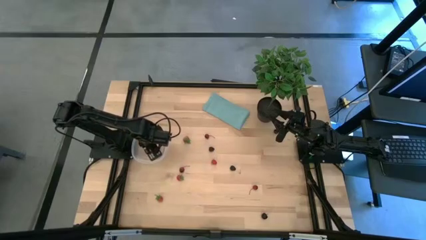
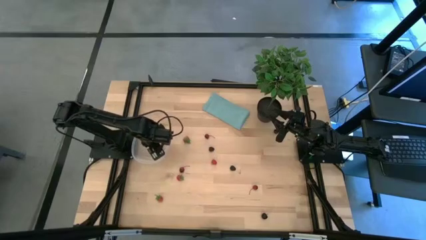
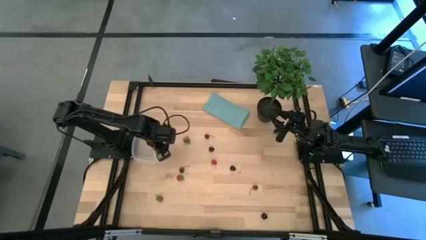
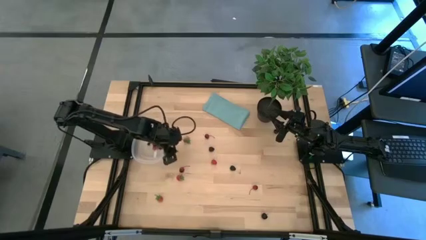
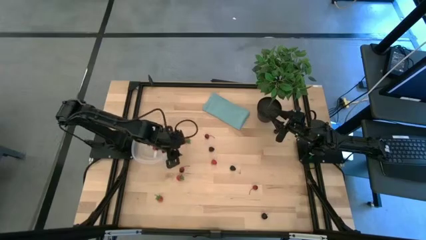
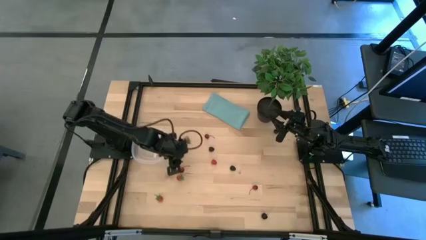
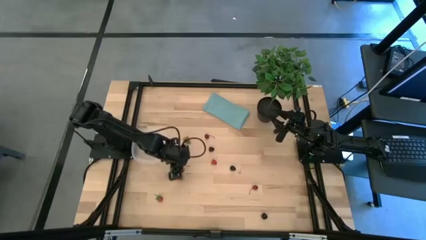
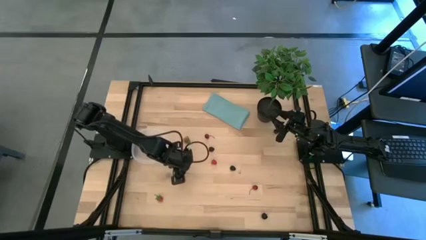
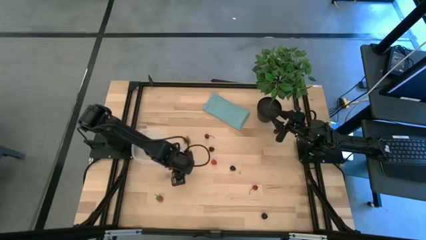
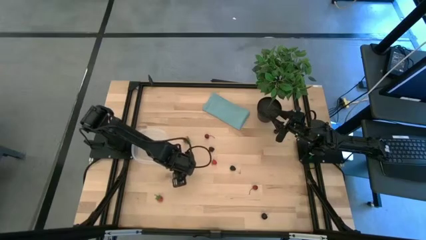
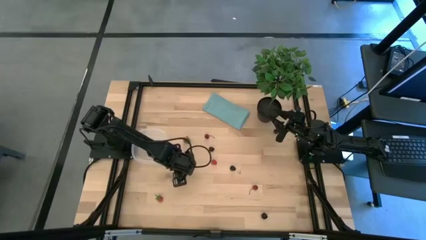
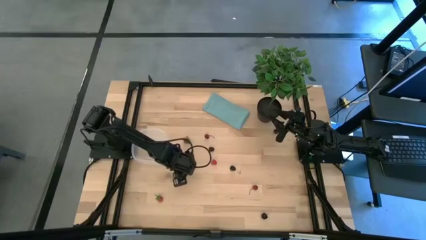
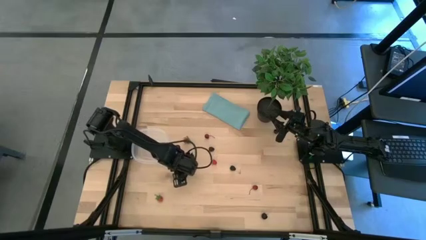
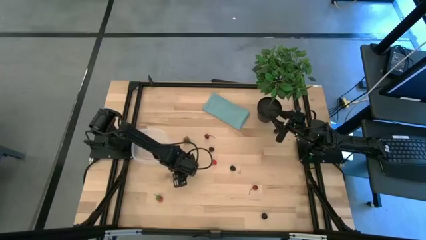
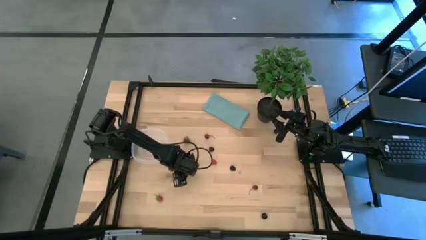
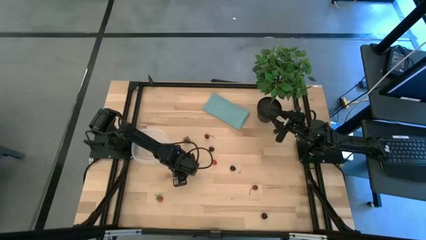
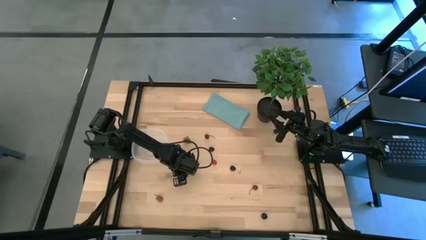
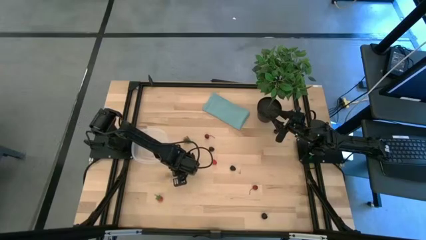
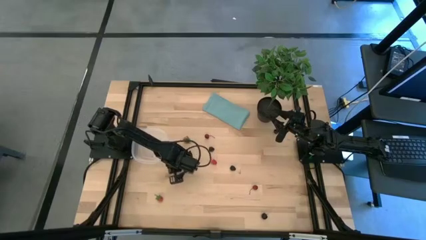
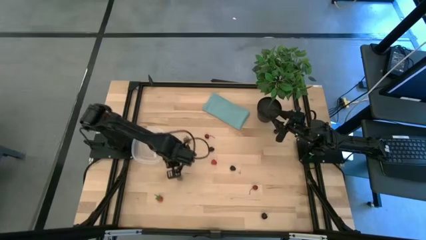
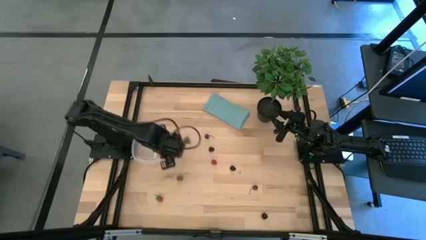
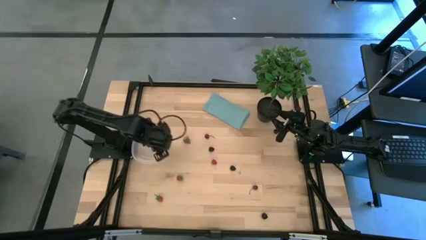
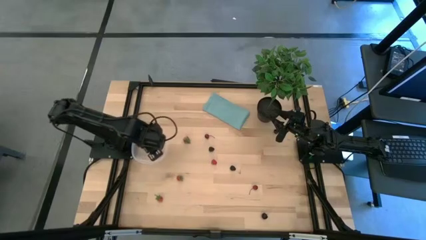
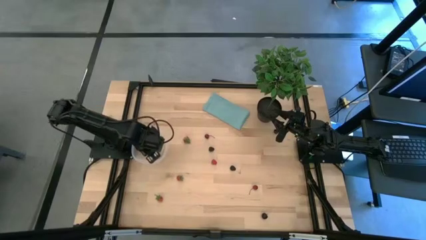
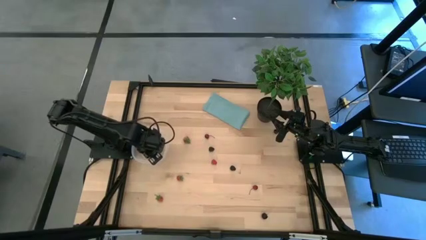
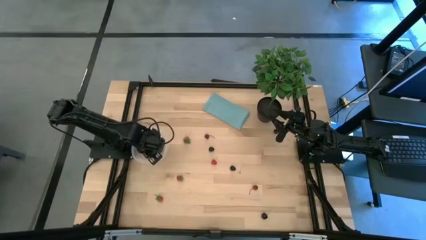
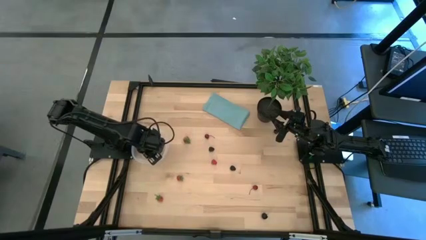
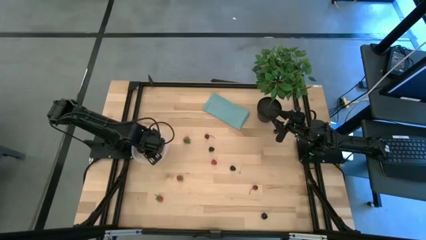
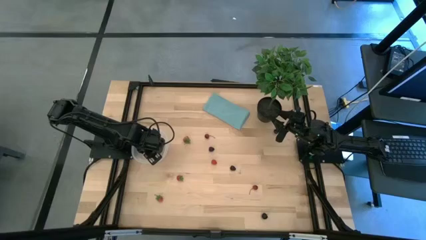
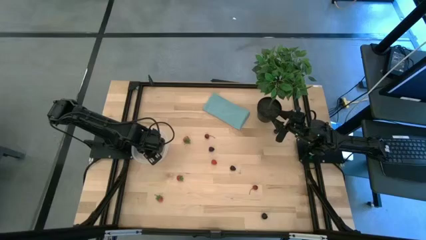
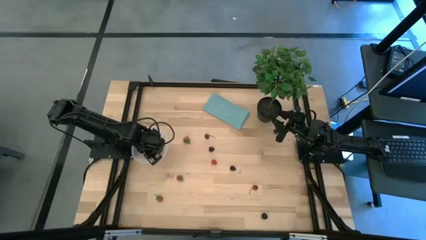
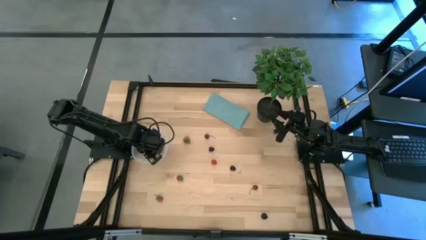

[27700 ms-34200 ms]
Task: Pick and placing Produce into tupperware
Put the middle left red cherry into the transparent bin

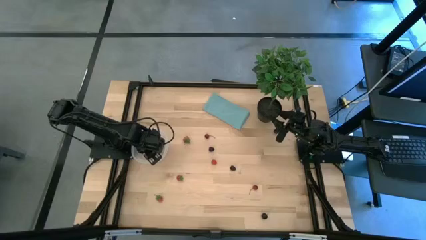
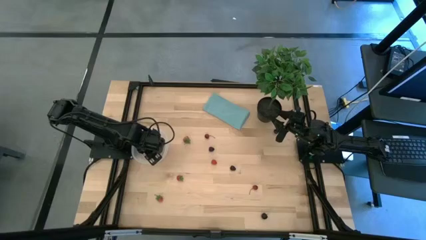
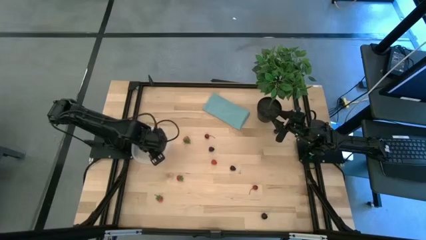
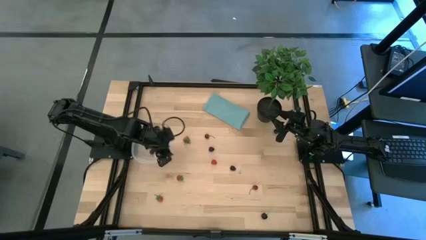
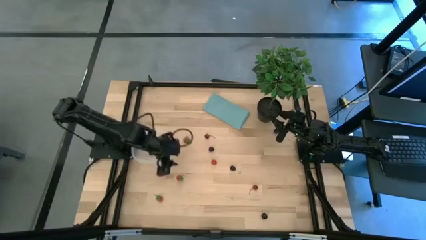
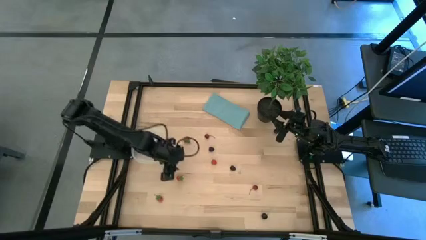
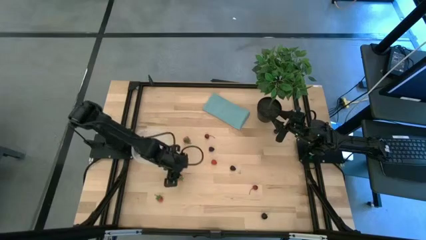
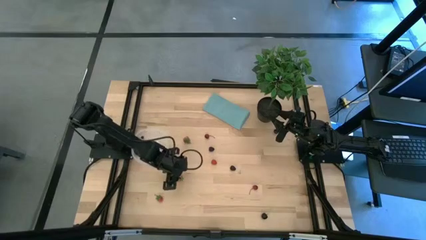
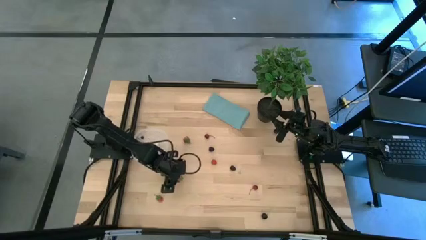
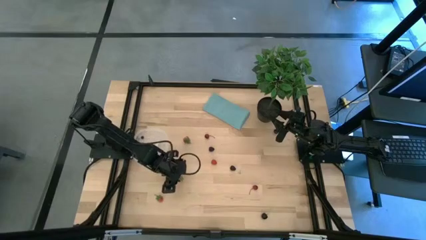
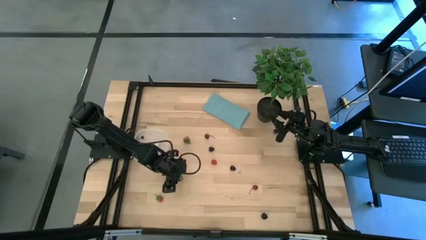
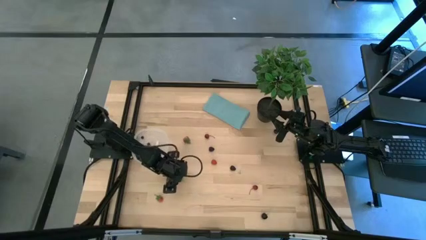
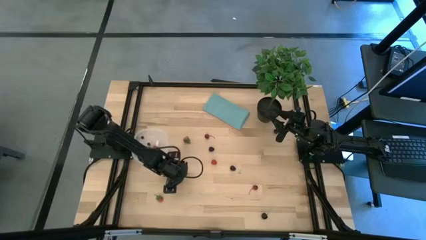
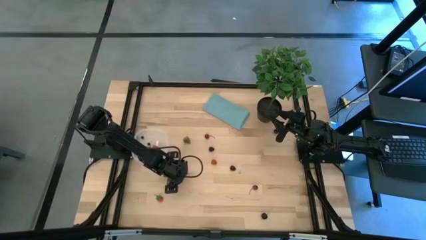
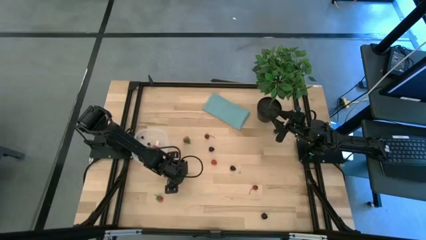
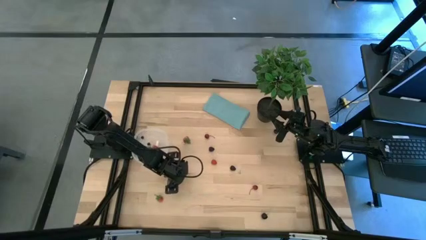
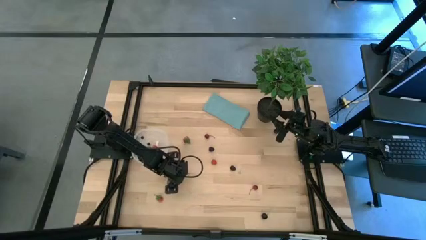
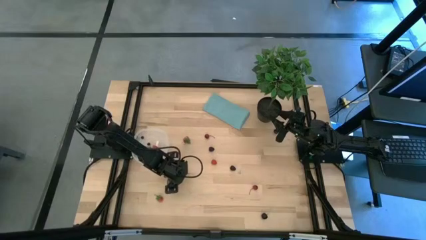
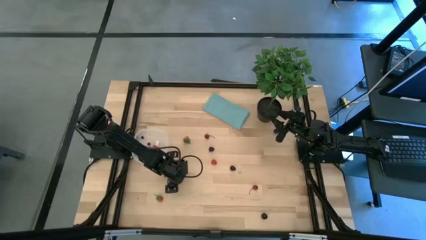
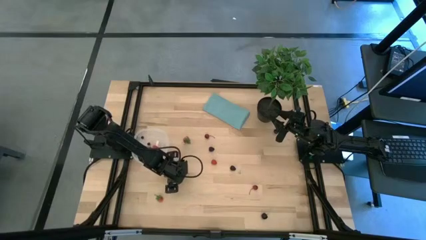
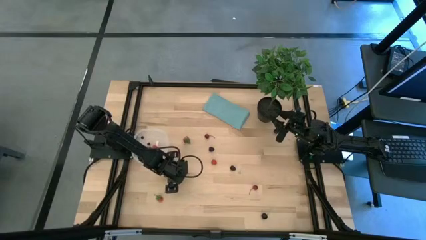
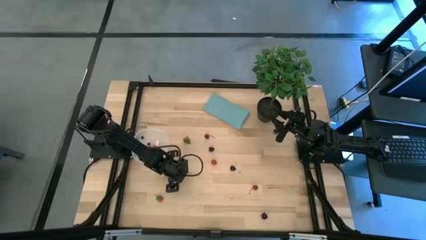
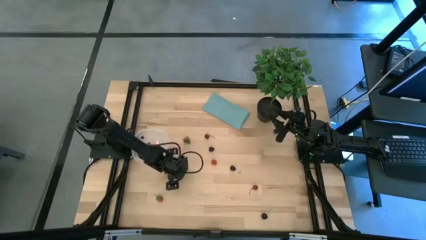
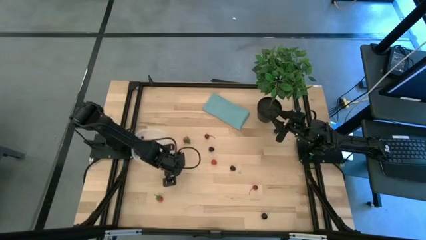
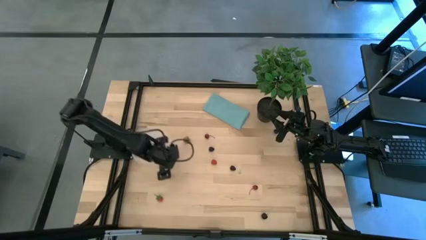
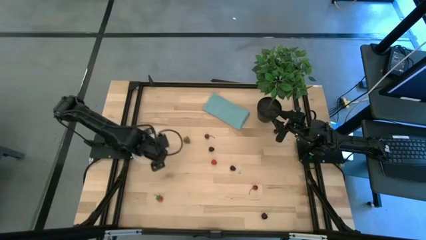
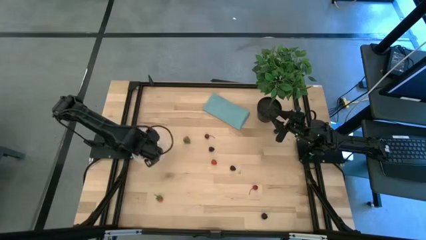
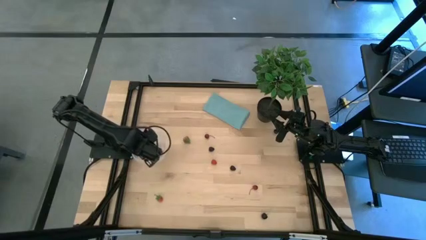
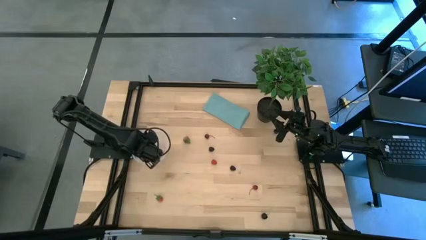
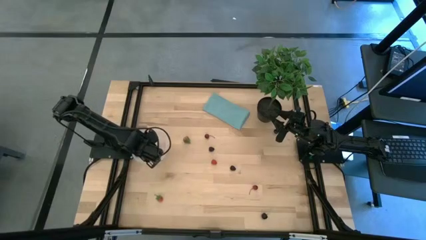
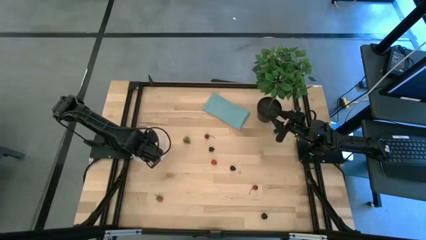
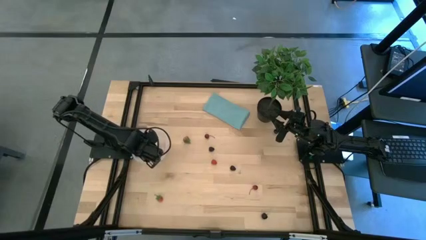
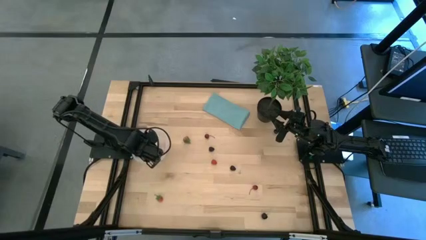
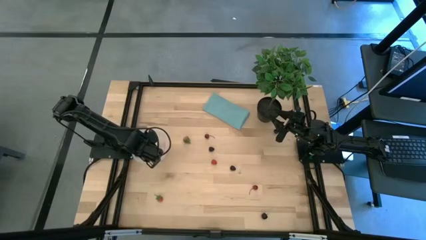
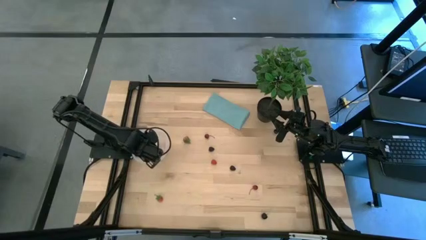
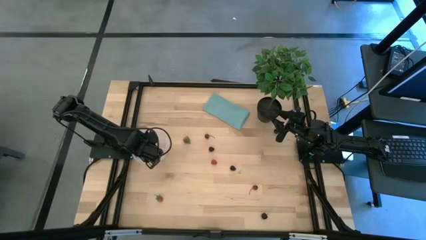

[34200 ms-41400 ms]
Put the middle red strawberry into the transparent bin

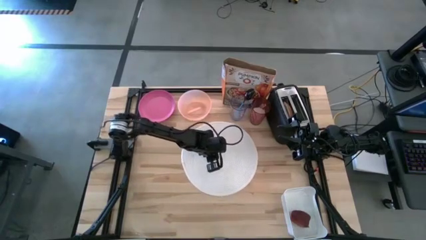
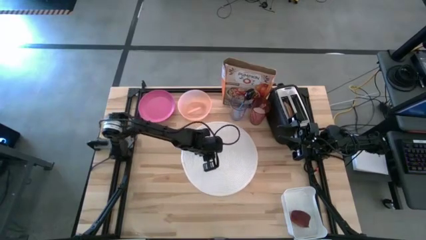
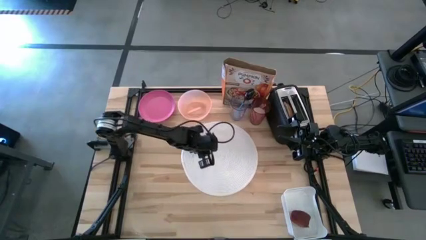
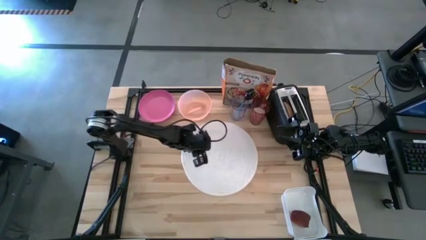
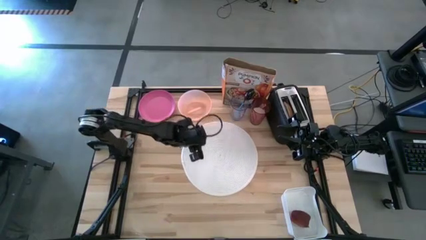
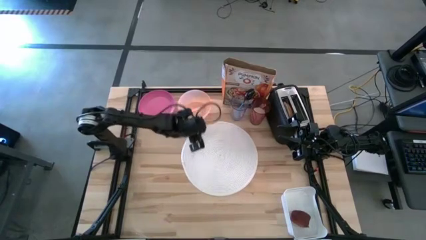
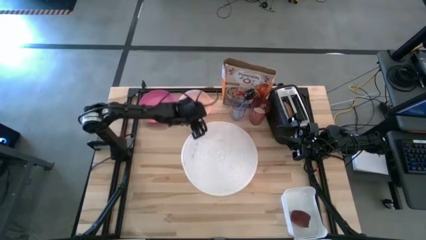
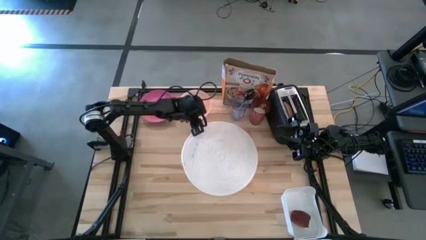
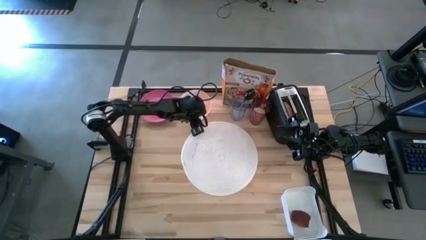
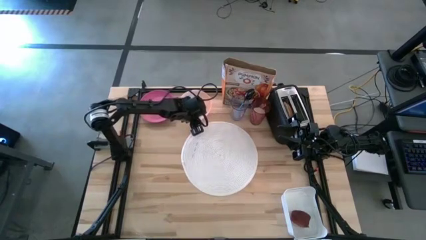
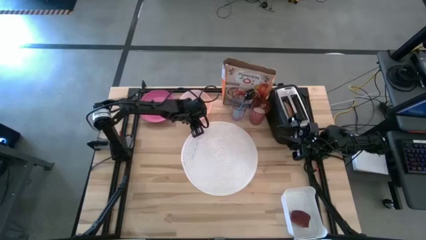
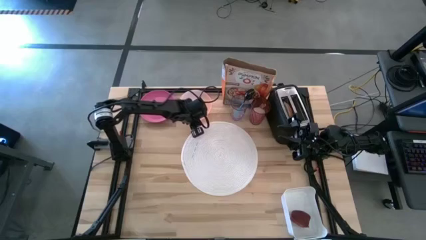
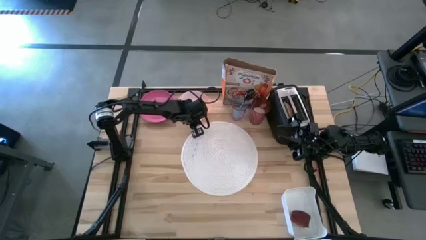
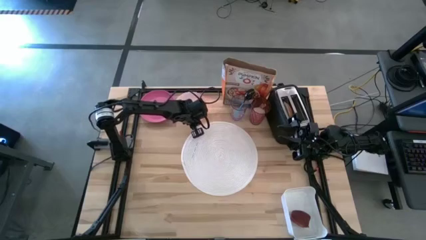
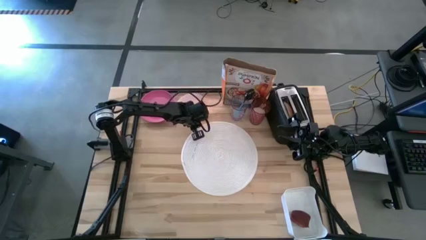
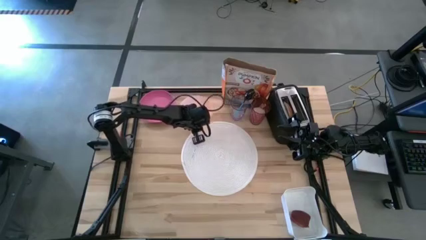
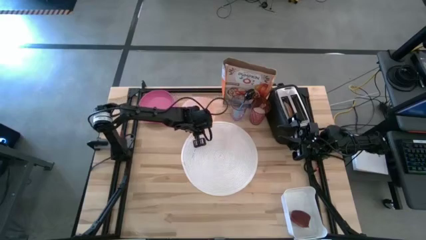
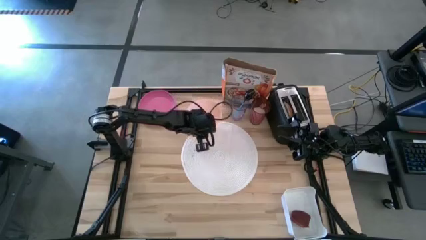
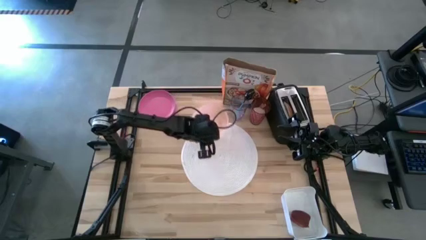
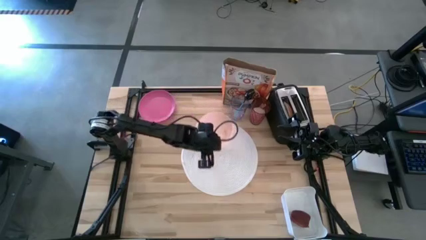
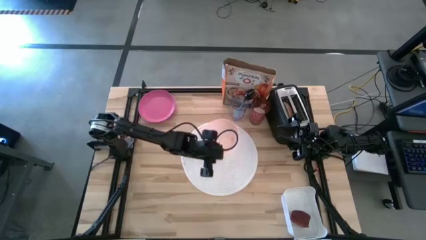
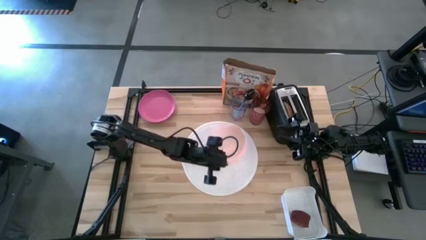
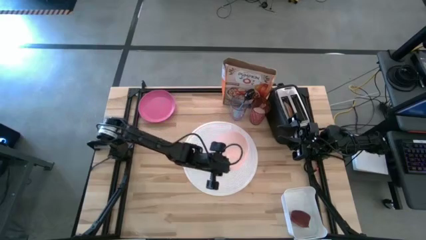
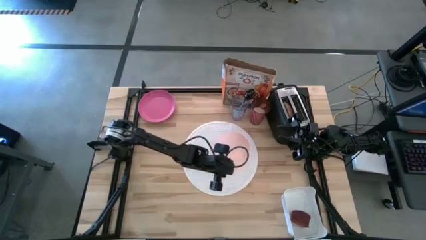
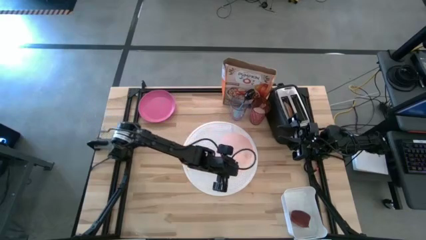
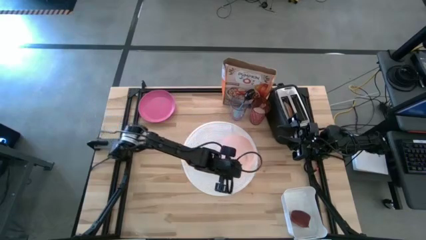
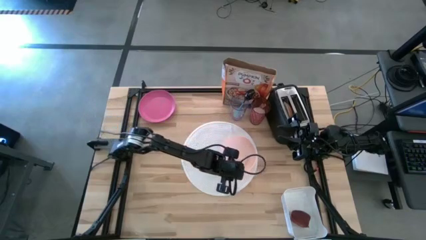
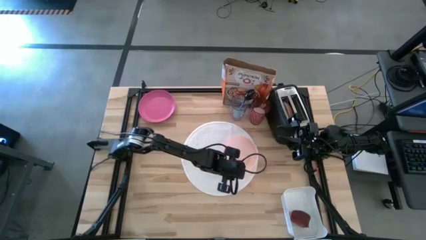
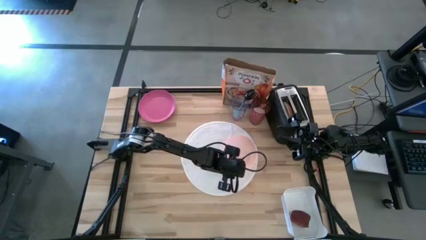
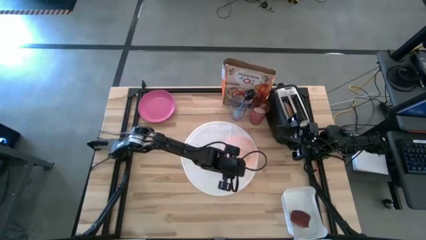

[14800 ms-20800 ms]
Task: Arrange a breakfast setting
Put the orange bowl on the side side of the white table mat
